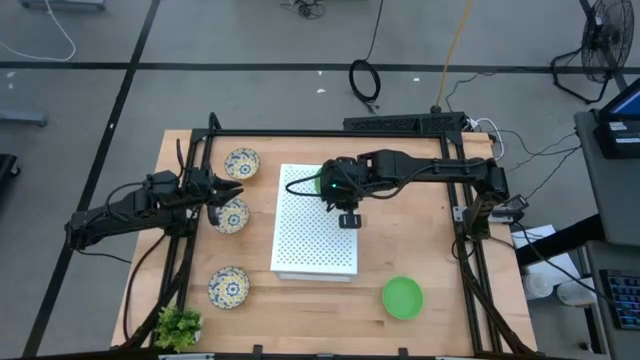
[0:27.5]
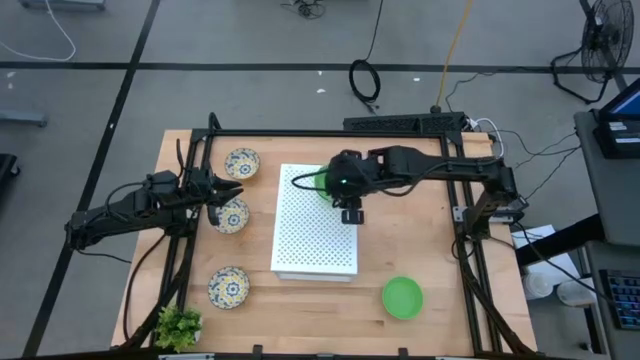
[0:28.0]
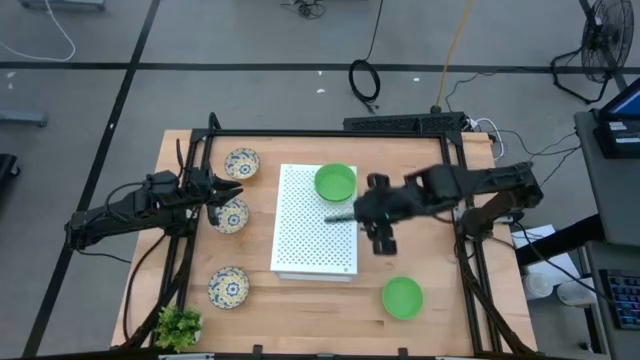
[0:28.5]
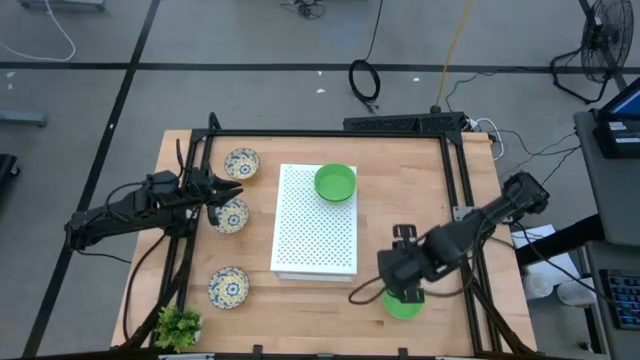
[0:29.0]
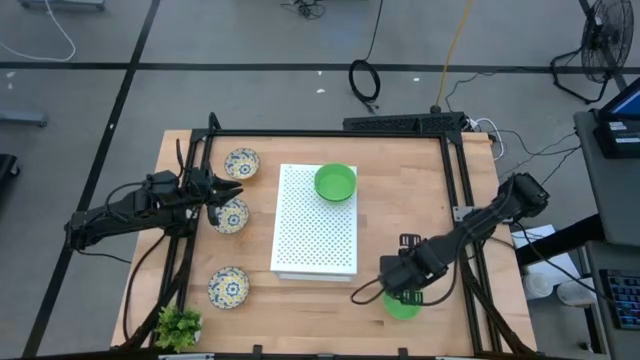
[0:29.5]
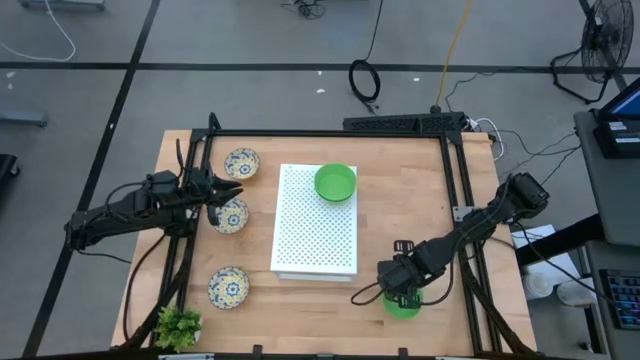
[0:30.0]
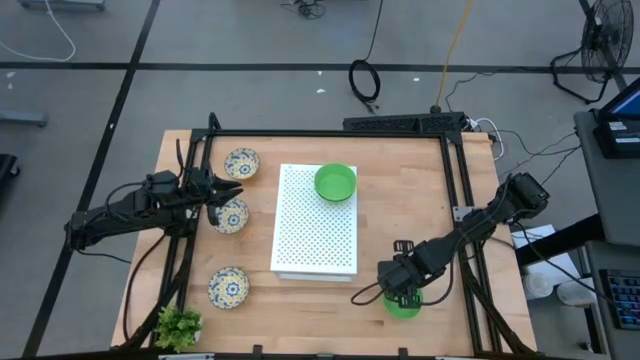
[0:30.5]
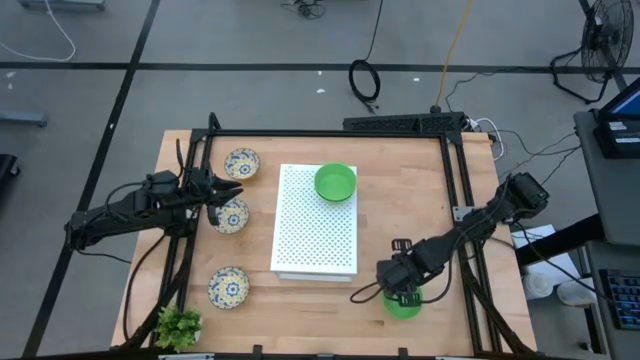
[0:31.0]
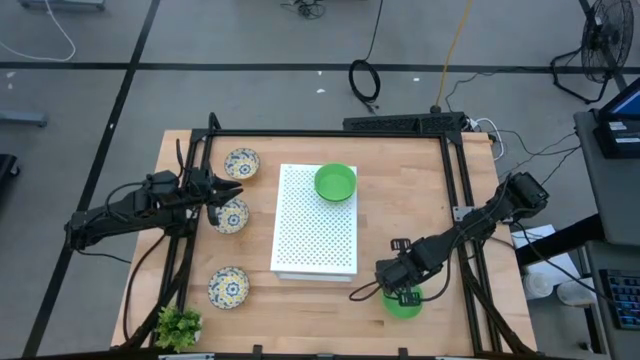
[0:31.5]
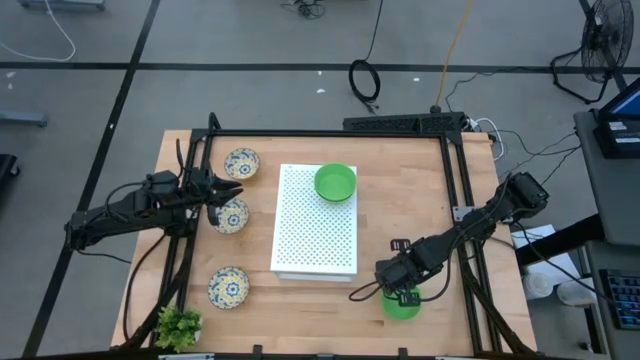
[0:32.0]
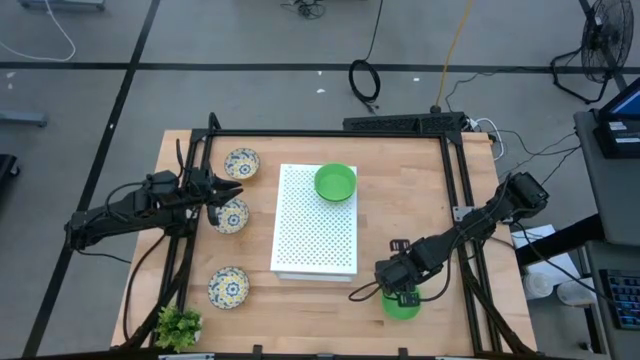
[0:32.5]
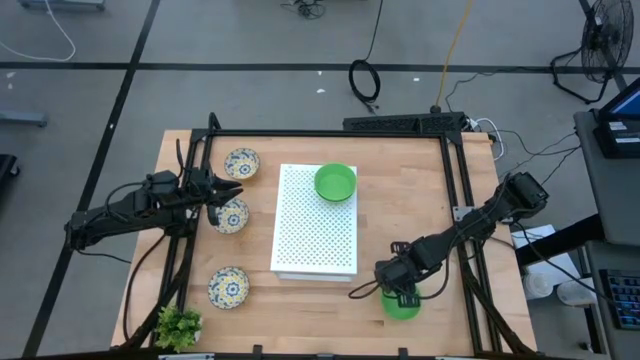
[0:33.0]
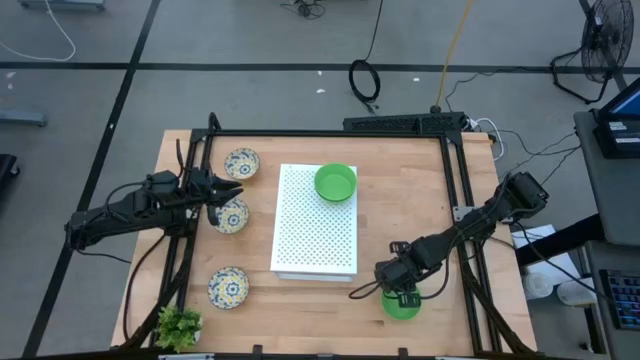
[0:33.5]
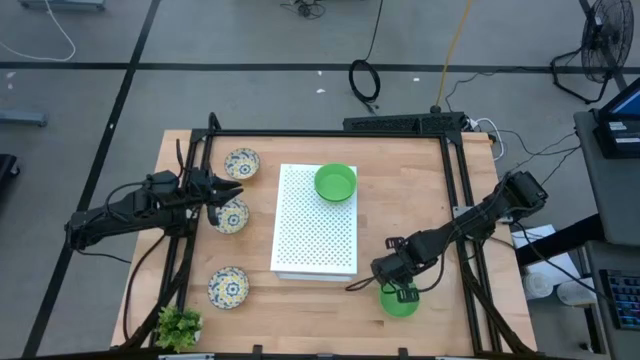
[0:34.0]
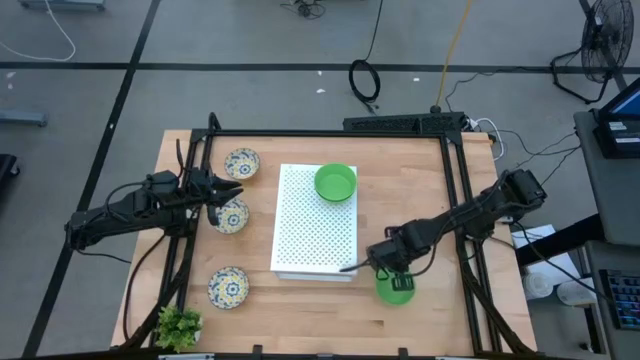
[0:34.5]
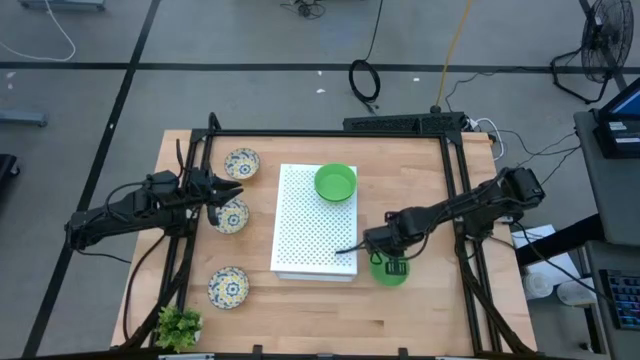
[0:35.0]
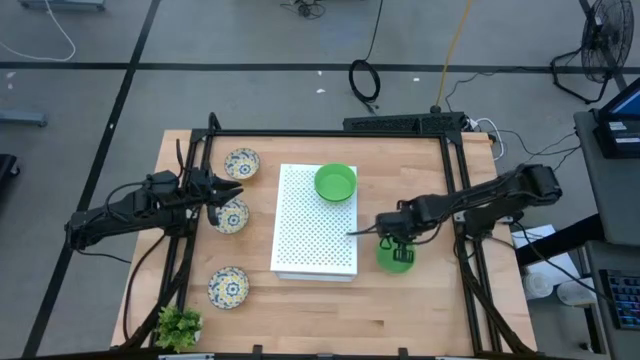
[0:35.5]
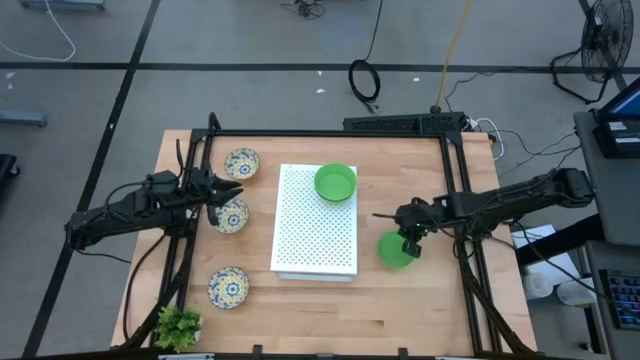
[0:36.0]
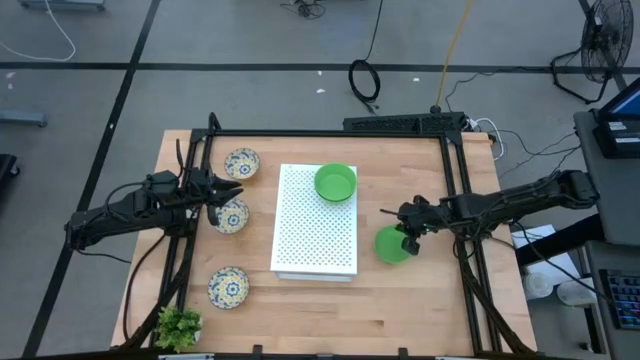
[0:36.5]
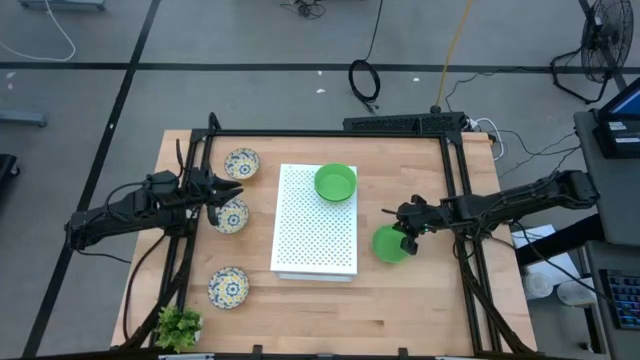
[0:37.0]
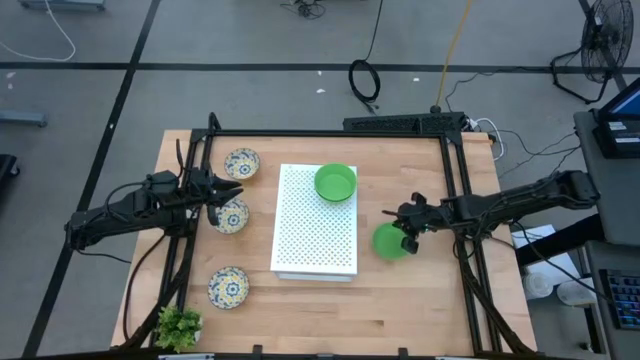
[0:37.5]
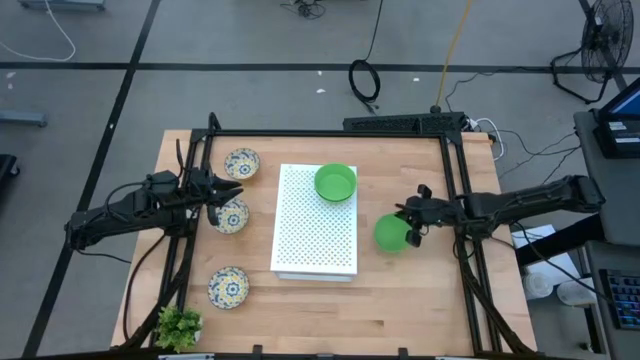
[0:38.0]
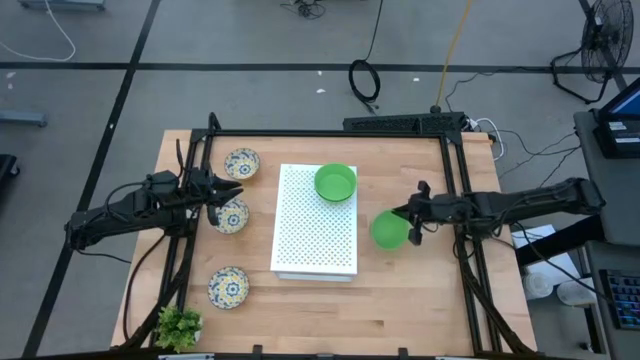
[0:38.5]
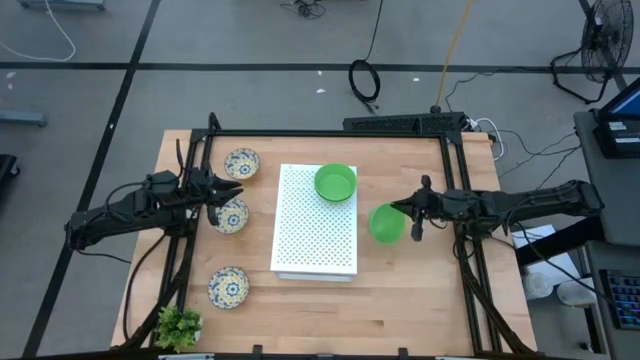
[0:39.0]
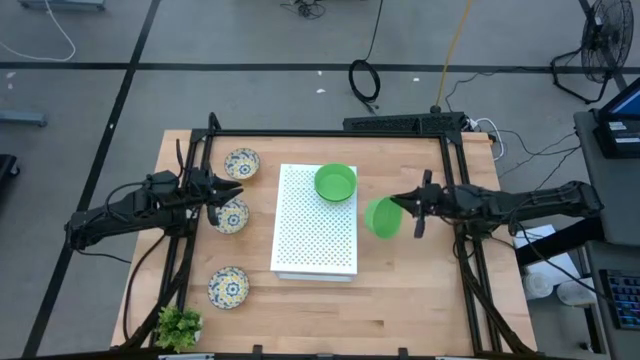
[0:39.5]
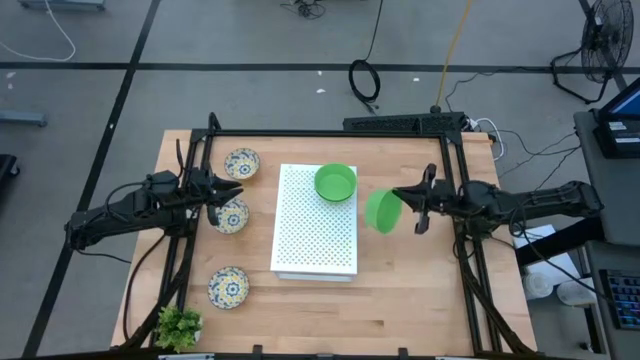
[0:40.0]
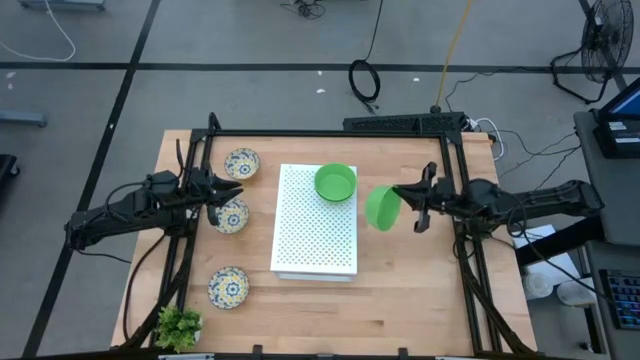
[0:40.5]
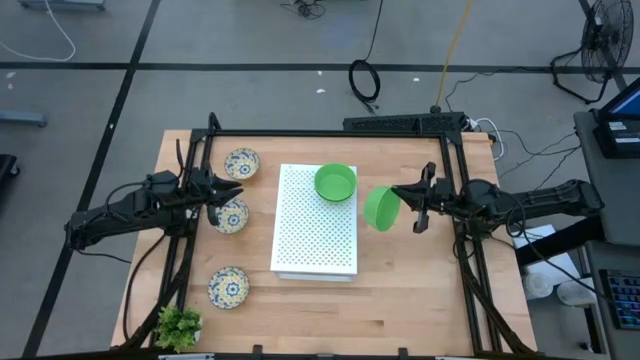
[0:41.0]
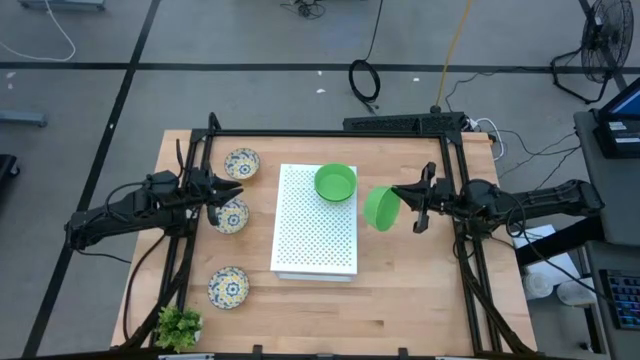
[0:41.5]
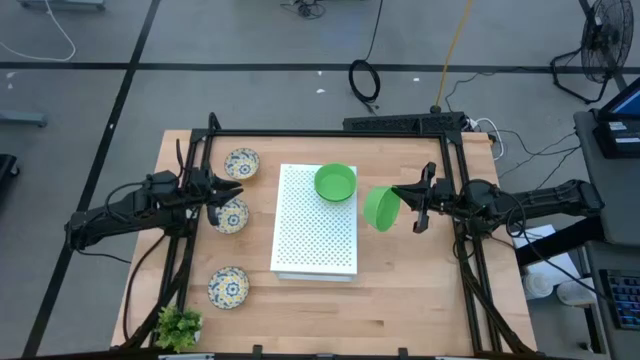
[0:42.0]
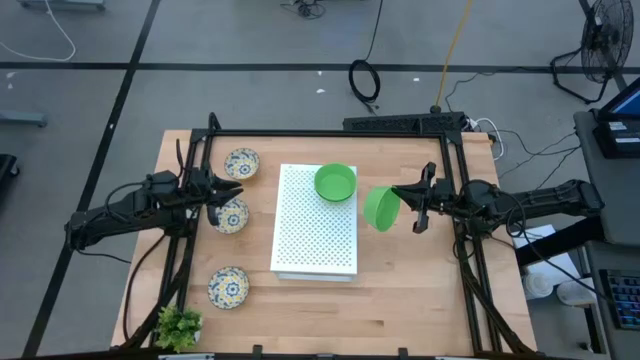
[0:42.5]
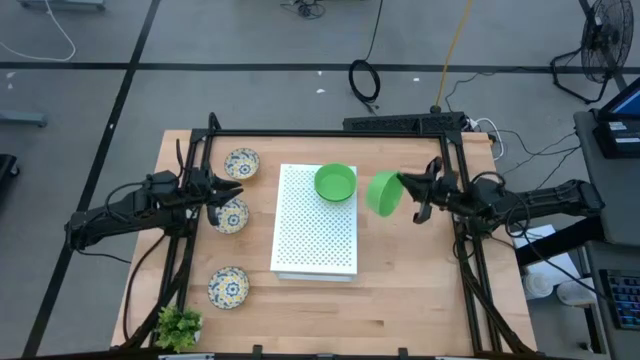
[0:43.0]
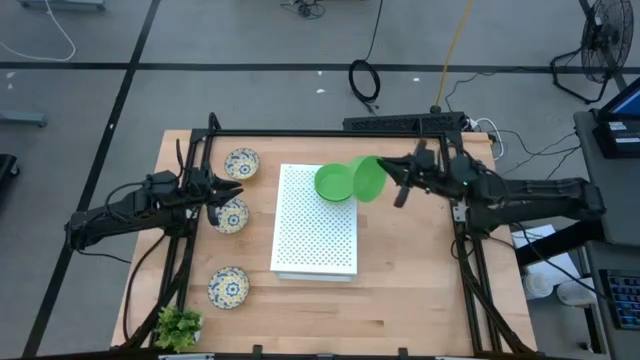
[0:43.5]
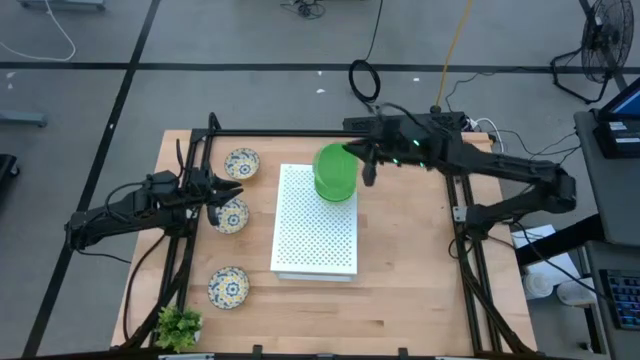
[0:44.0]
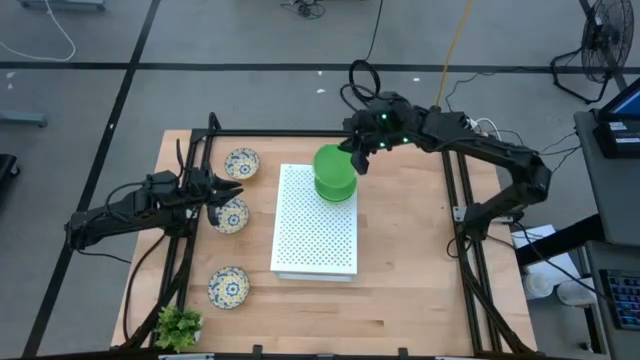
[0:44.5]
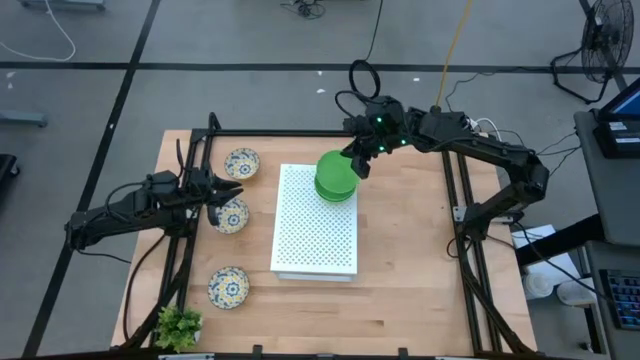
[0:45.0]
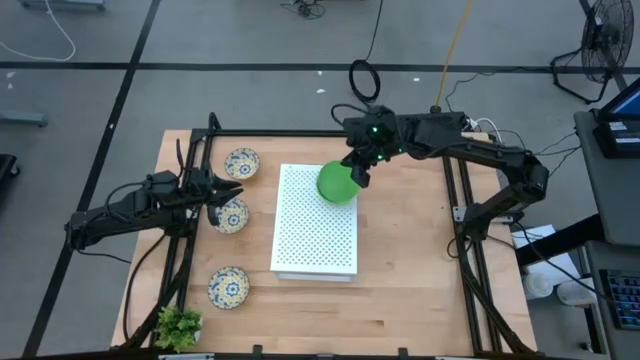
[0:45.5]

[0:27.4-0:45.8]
Task: Pick & Place Mini bowls
Stack the green bowl on the green bowl on the shelf
